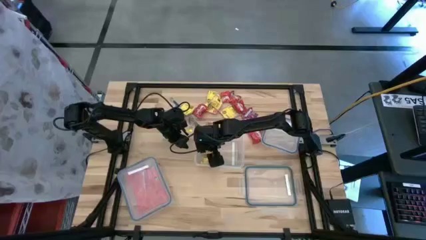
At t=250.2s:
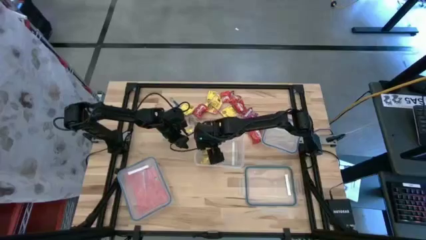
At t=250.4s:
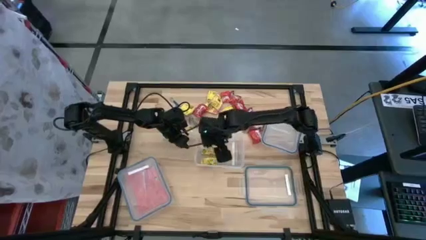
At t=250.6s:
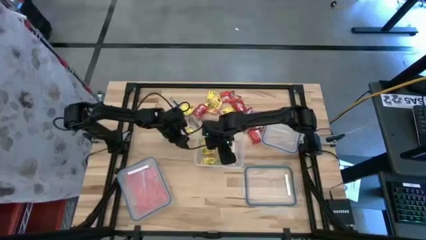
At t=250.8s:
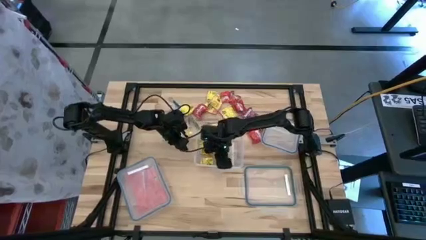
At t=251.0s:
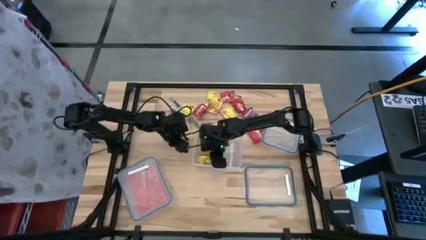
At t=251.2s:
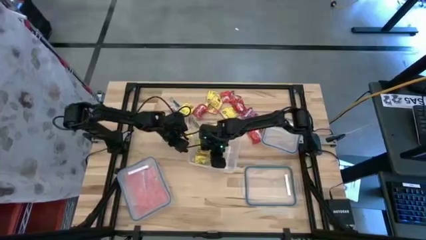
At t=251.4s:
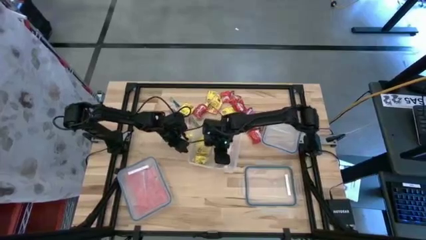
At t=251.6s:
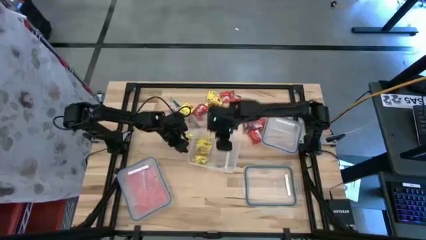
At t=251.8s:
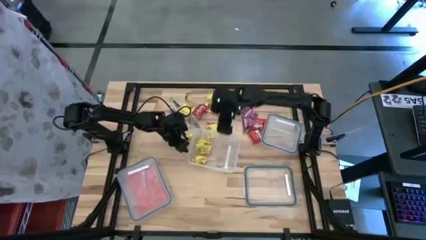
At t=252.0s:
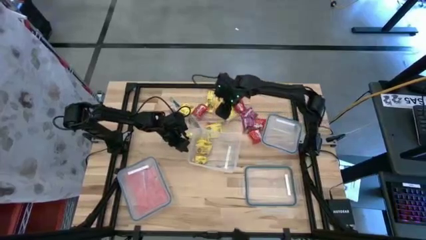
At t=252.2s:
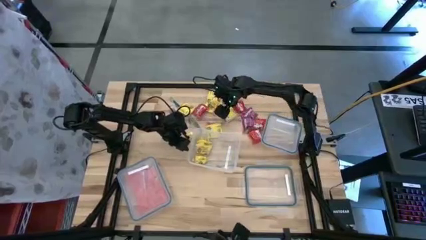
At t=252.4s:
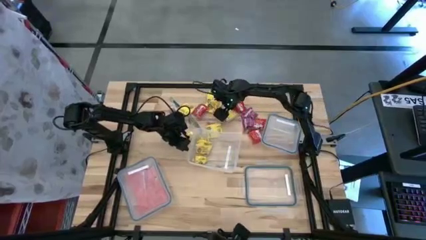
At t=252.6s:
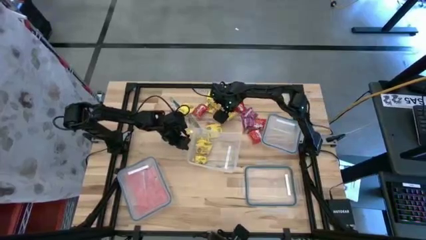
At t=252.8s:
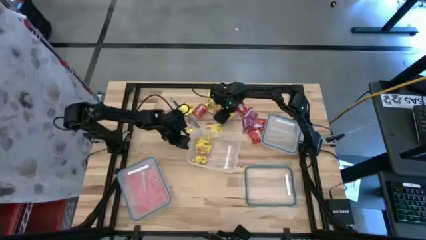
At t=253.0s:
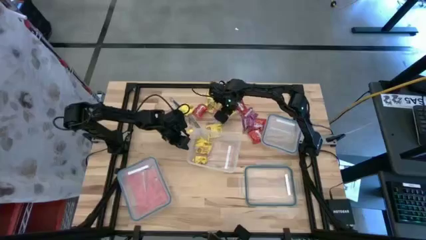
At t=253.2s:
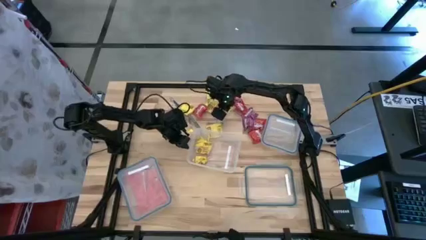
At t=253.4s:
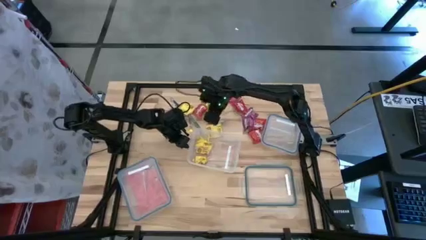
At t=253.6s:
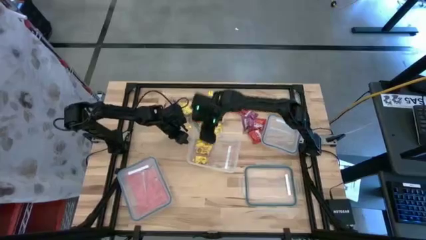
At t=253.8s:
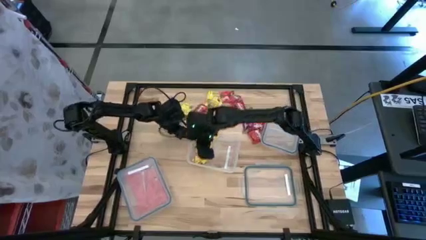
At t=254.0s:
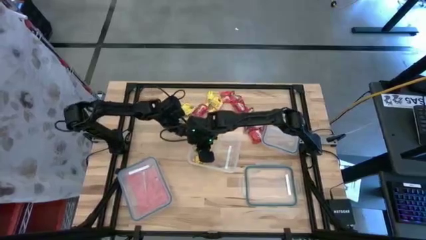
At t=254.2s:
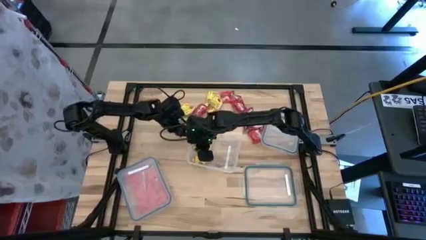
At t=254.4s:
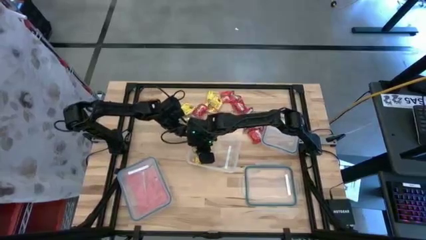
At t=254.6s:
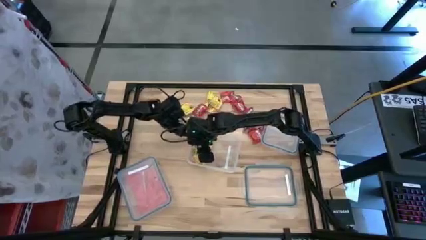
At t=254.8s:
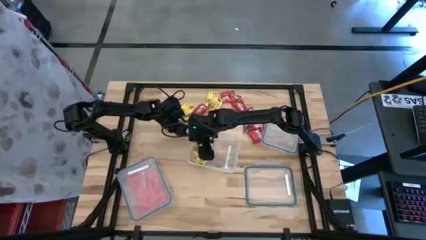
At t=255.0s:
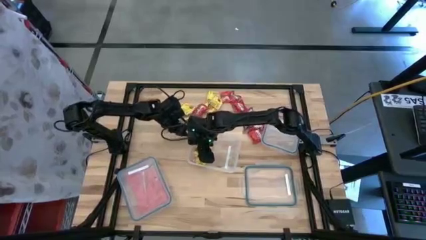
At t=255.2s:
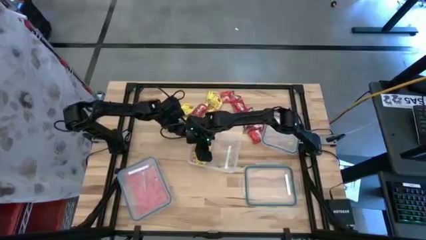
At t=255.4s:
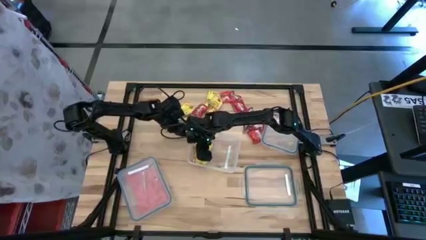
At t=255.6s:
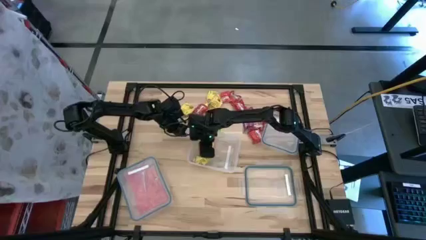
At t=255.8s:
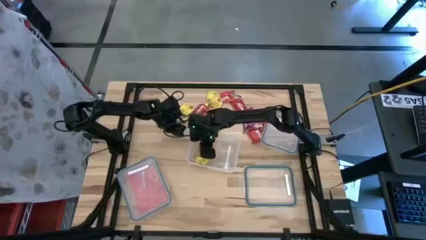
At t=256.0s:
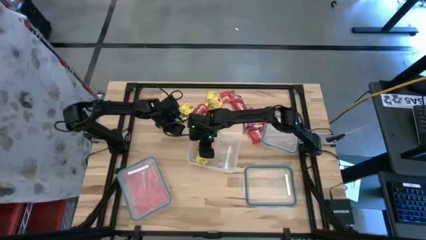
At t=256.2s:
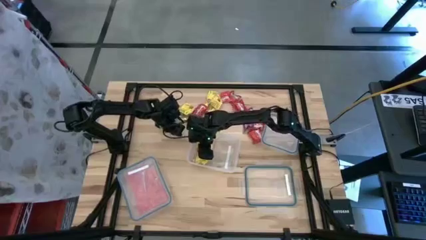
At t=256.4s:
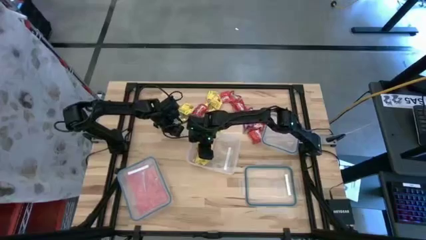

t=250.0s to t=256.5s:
Task: Sort candy
Put the yellow candy into the rectangular transparent bin

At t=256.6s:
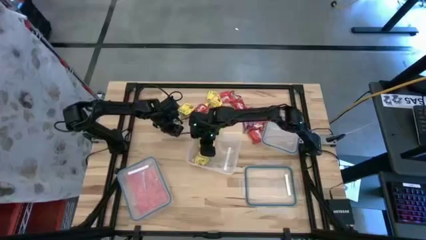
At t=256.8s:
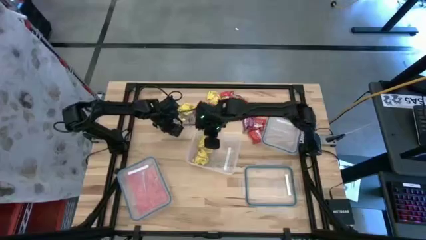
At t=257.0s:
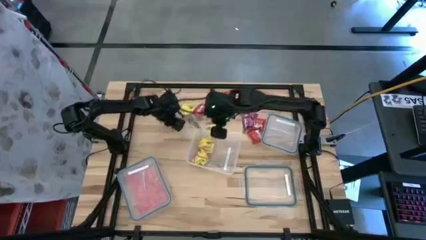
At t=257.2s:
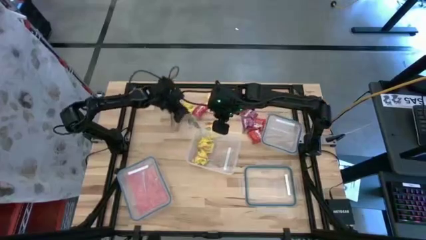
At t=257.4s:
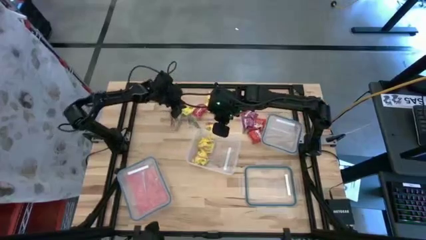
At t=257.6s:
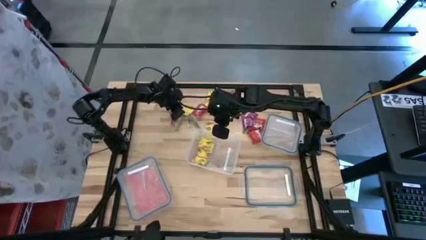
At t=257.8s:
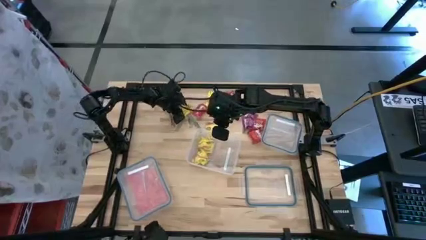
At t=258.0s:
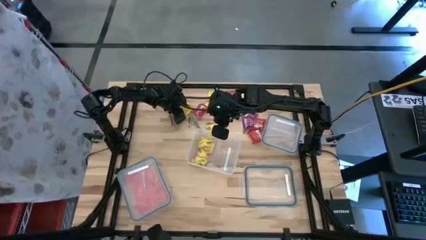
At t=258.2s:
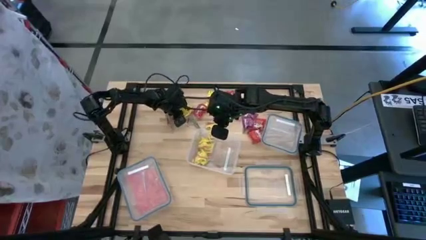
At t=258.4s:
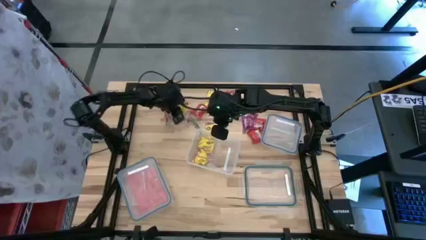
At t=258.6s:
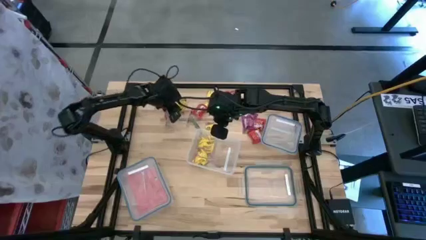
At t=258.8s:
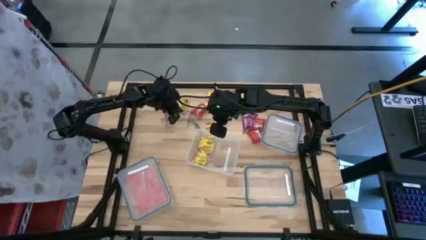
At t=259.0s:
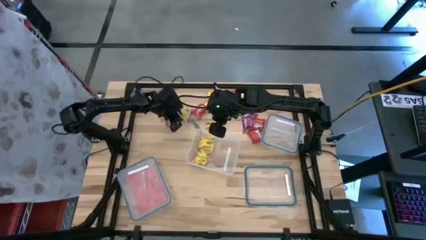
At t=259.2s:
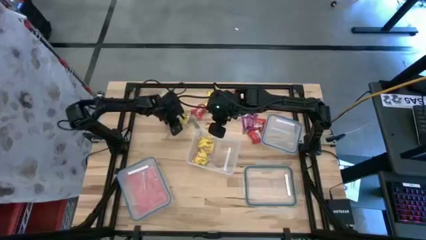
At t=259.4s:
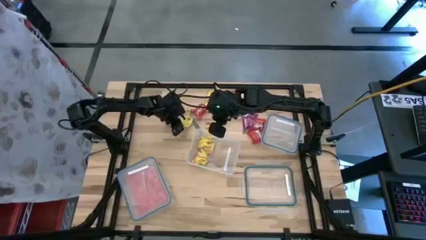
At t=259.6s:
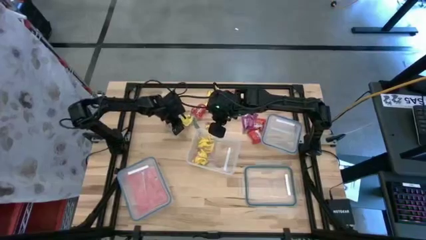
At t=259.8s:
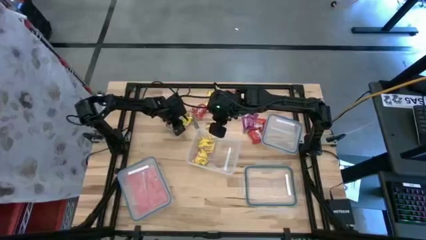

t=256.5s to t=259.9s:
Put the yellow candy into the rectangular transparent bin

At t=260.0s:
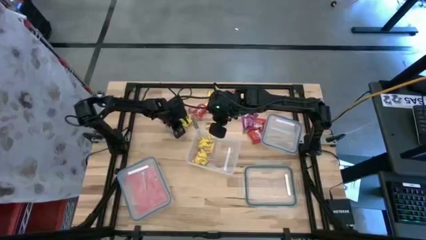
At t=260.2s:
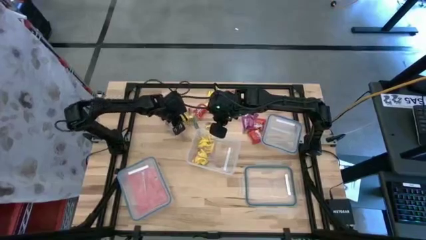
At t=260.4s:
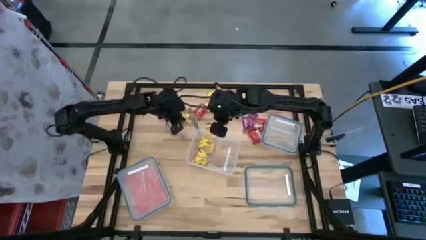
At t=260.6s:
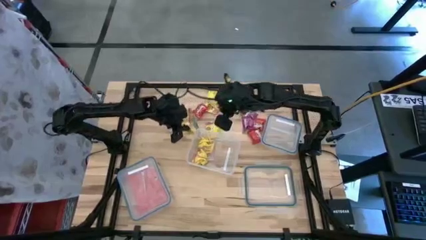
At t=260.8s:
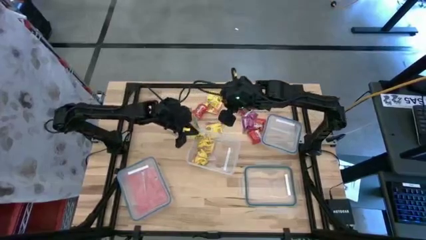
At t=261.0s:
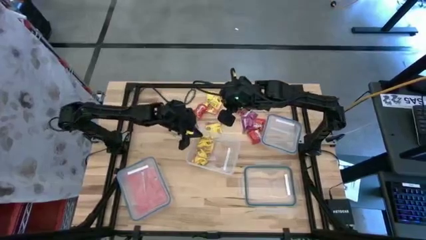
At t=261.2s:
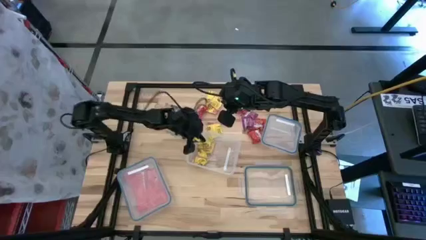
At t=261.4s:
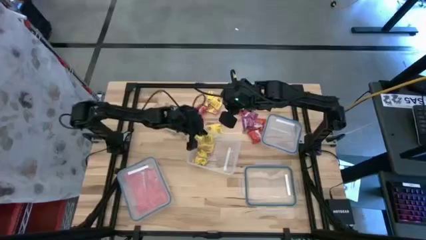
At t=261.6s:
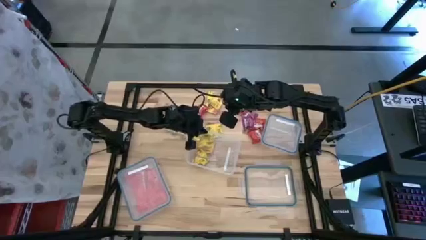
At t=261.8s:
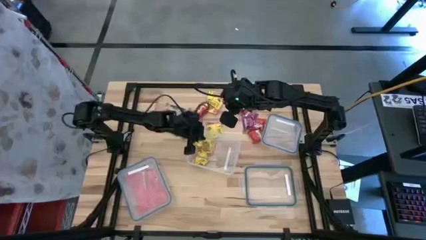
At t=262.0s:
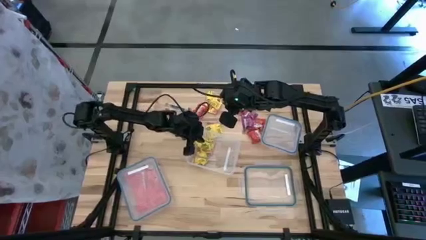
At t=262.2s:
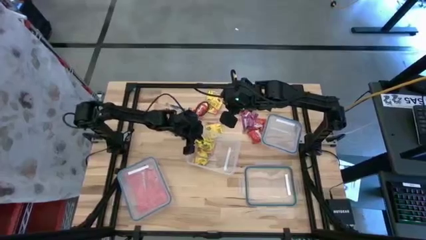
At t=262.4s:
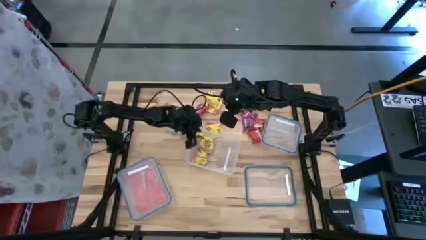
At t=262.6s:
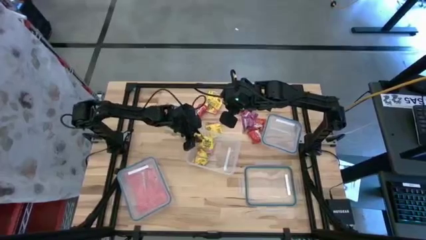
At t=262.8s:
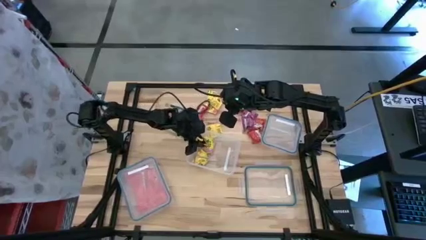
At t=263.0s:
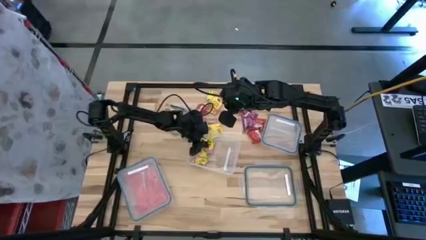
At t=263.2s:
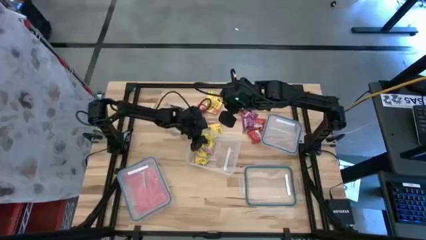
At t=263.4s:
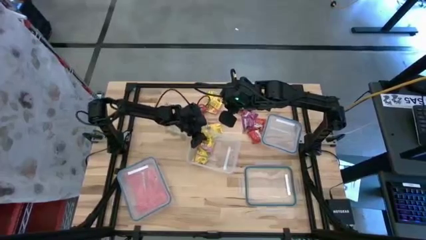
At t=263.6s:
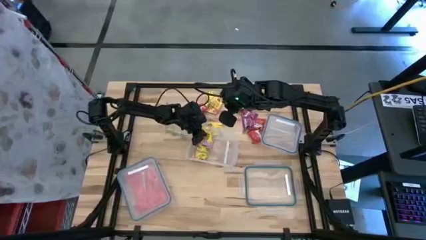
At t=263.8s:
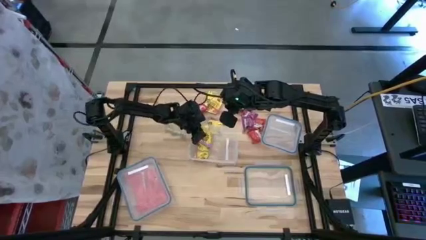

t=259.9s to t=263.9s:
Put the yellow candy into the rectangular transparent bin

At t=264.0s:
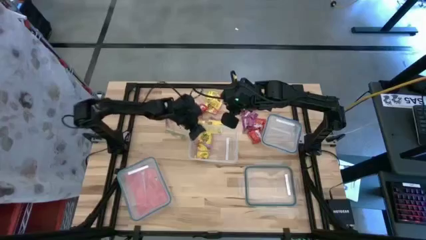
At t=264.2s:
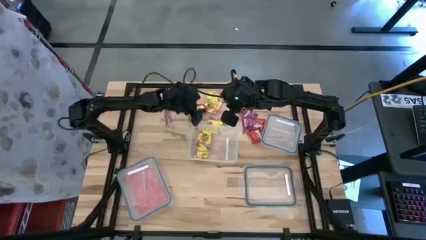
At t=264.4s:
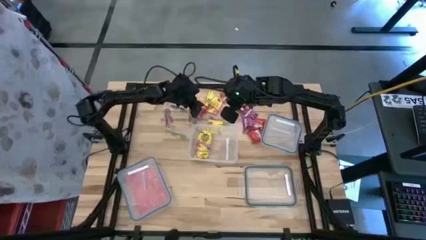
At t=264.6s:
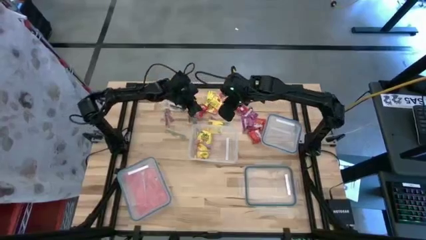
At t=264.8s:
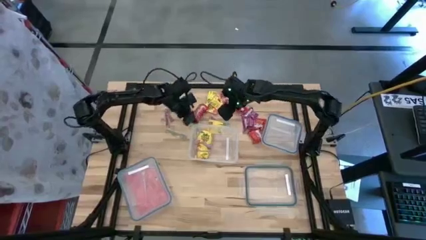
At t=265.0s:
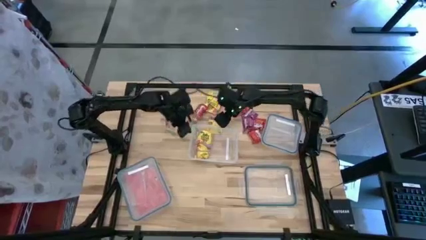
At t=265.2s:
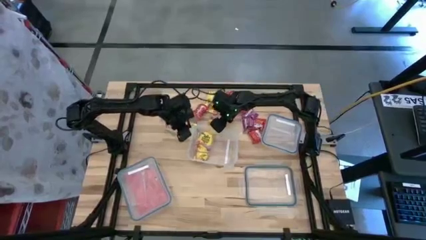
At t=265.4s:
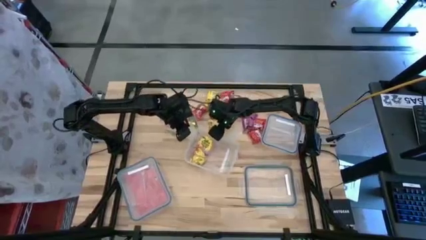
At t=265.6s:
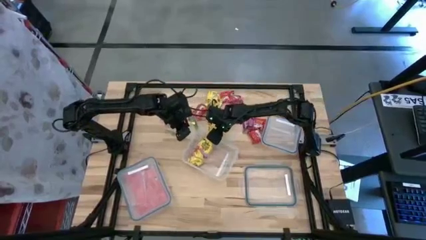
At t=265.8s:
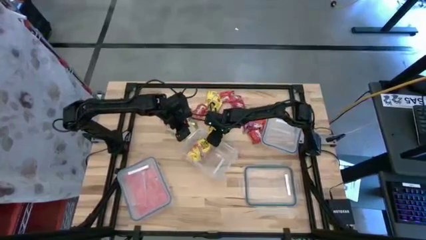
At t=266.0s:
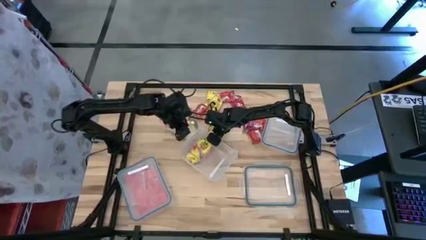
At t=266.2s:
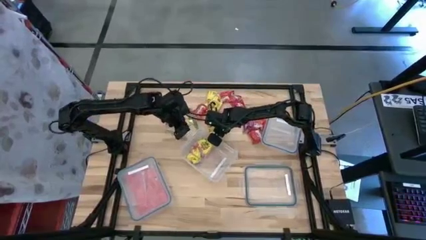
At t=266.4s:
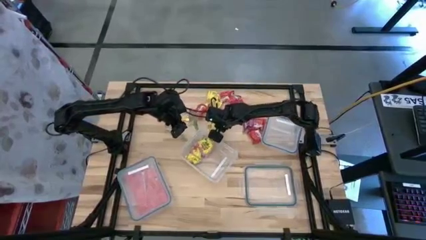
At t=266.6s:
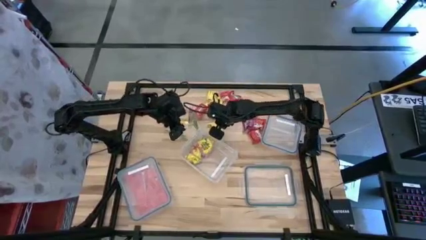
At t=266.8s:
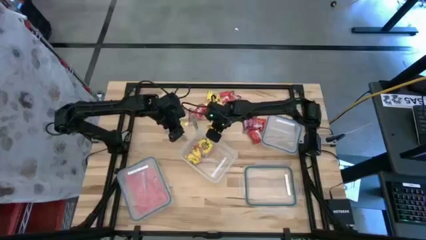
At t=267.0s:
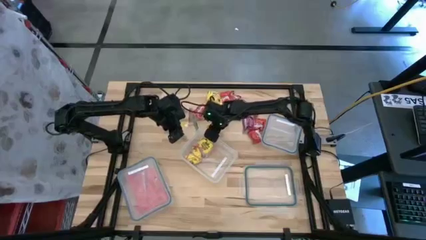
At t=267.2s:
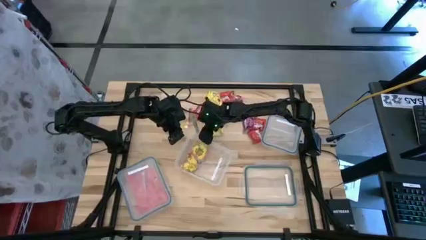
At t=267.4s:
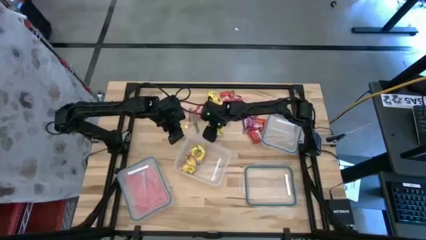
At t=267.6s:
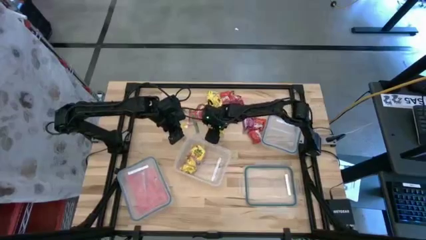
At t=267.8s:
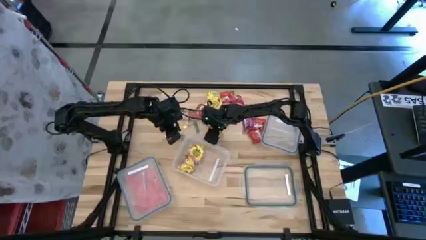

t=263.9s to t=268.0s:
Put the yellow candy into the rectangular transparent bin
